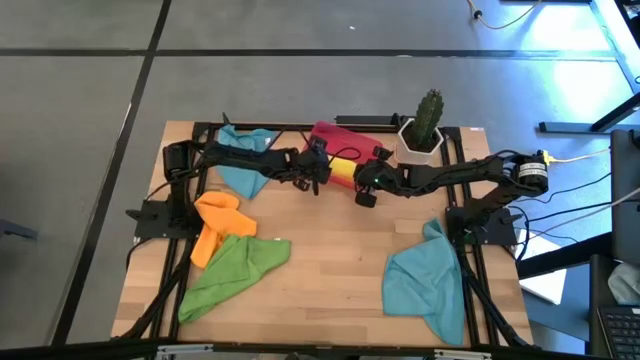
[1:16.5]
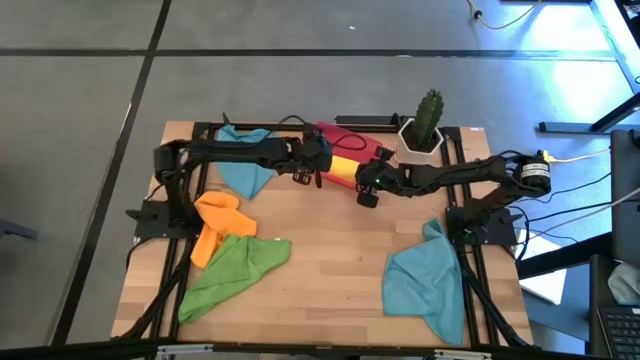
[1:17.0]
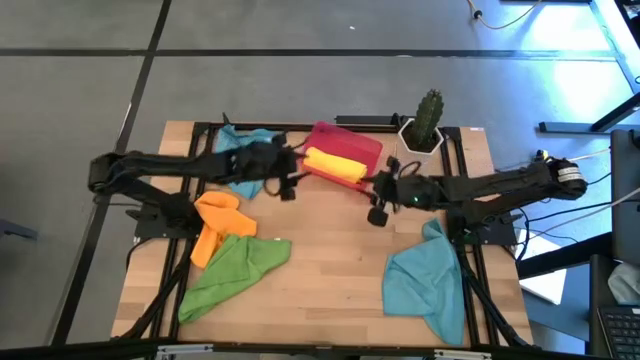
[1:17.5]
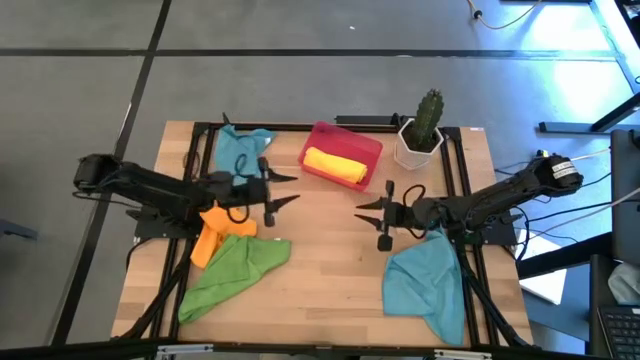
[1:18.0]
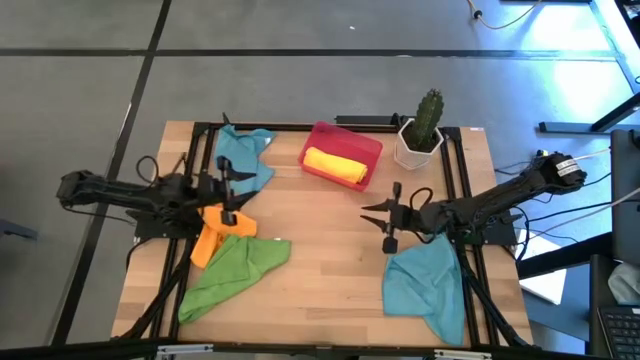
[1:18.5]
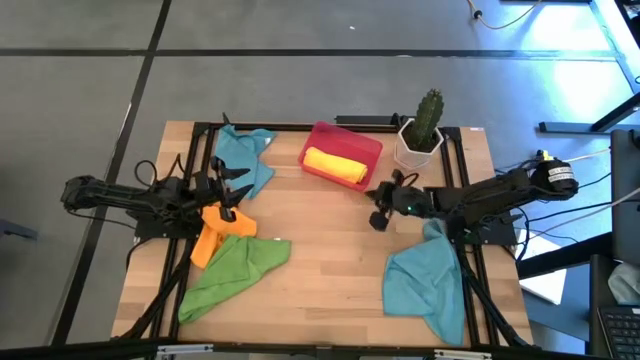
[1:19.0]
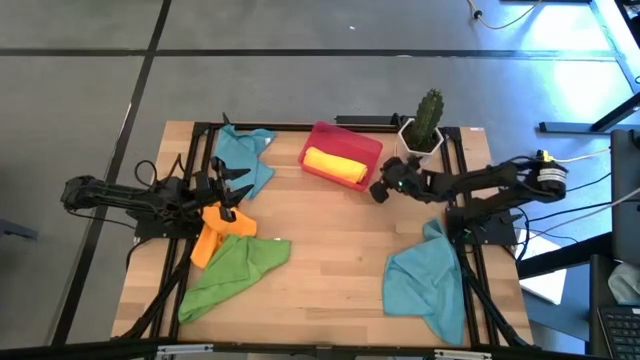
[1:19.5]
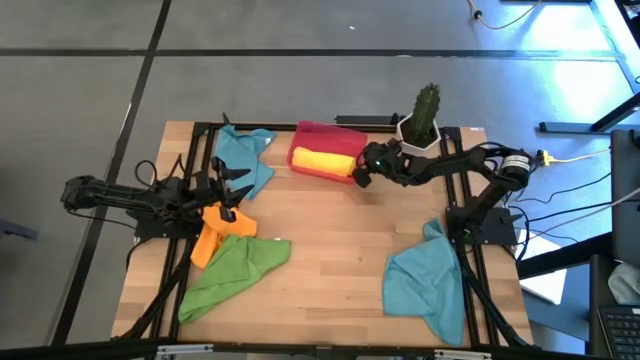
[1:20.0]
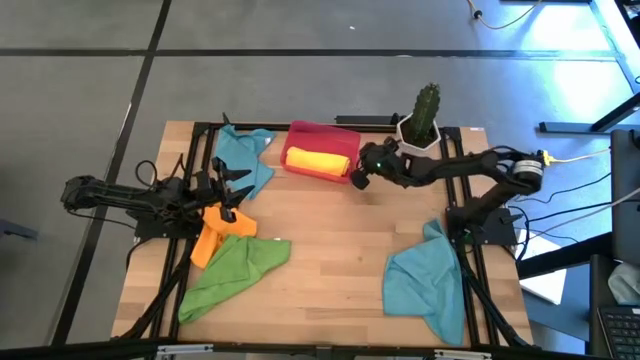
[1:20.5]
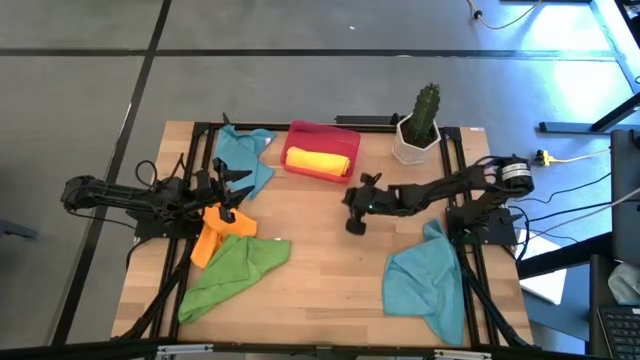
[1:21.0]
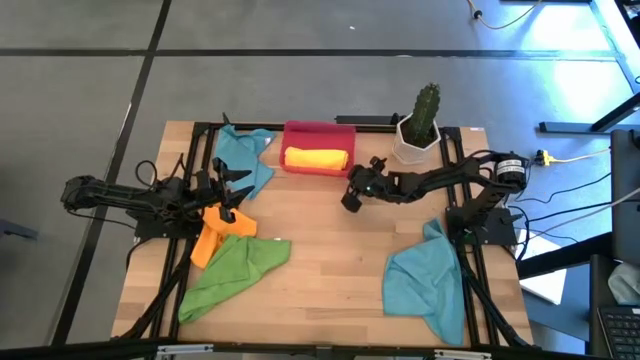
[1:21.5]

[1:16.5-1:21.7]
Task: Roll microfiber towels into tight, uniform cylinder then place into a basket
Adjust the red bin

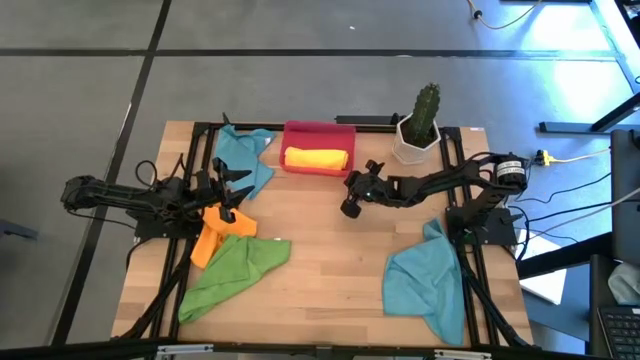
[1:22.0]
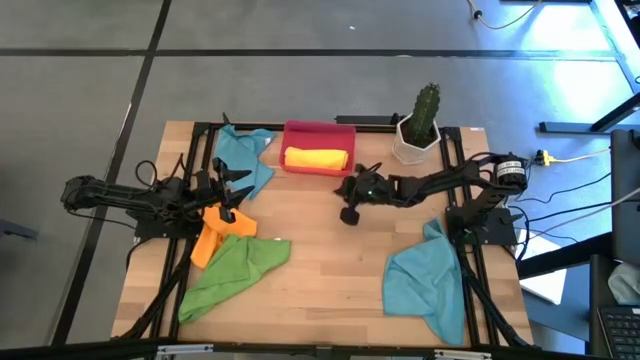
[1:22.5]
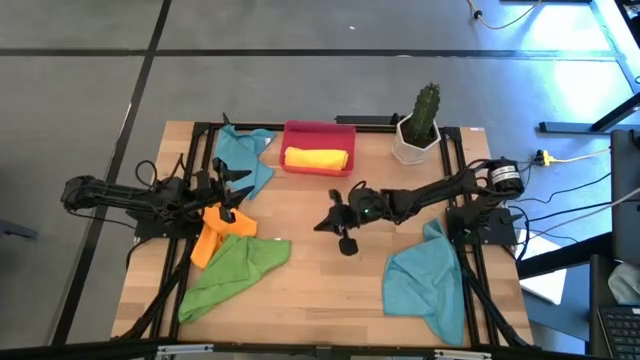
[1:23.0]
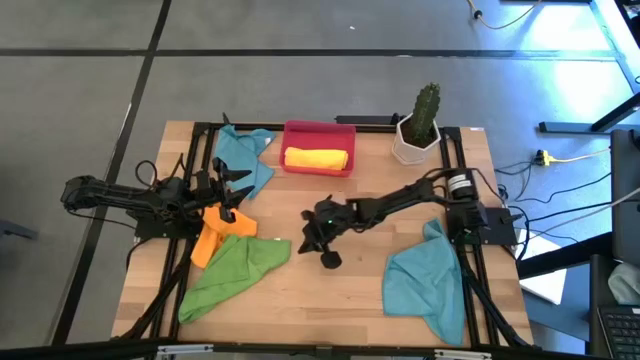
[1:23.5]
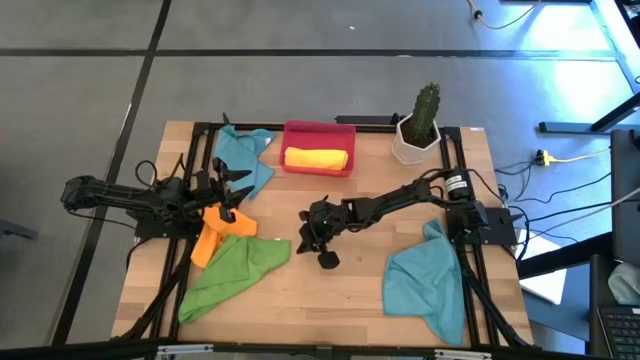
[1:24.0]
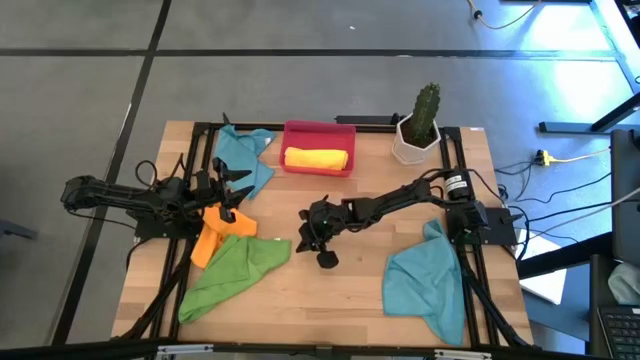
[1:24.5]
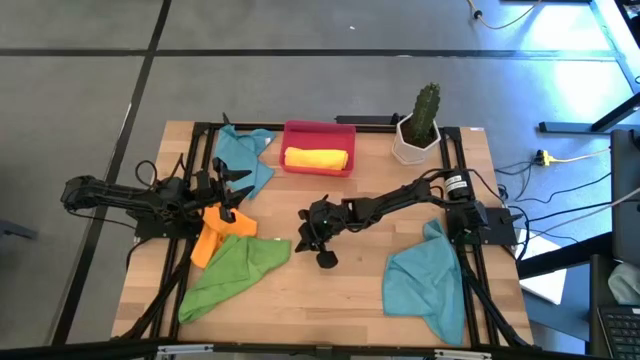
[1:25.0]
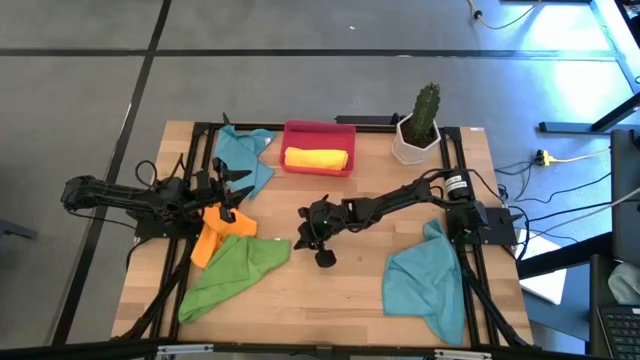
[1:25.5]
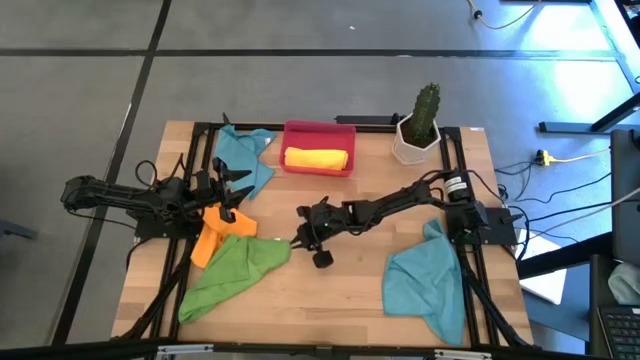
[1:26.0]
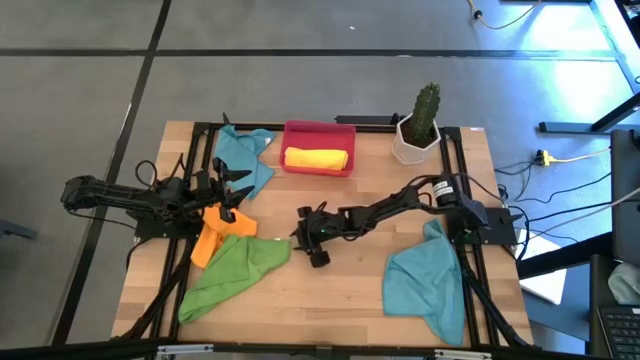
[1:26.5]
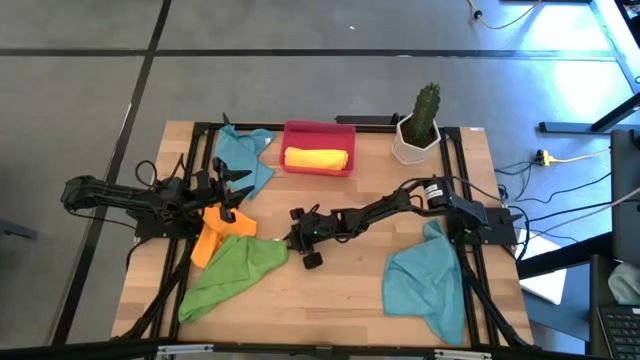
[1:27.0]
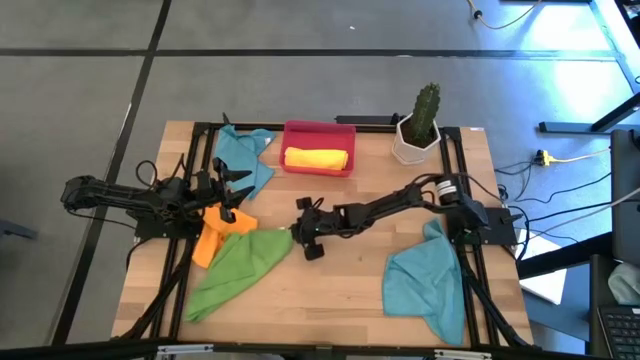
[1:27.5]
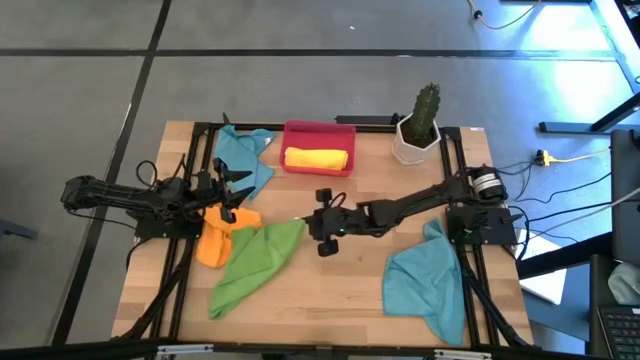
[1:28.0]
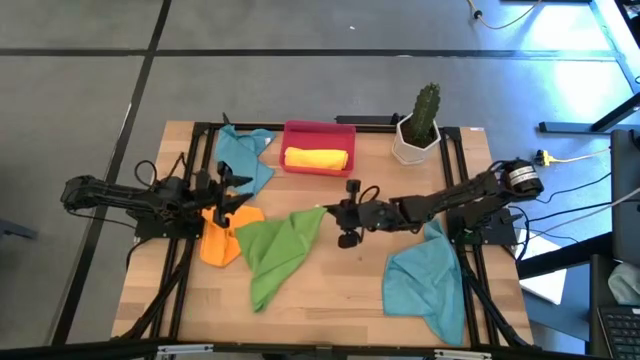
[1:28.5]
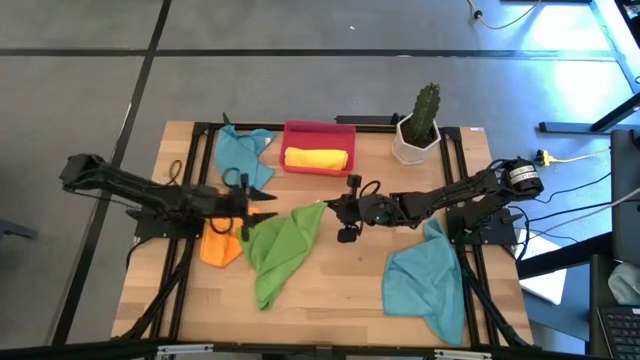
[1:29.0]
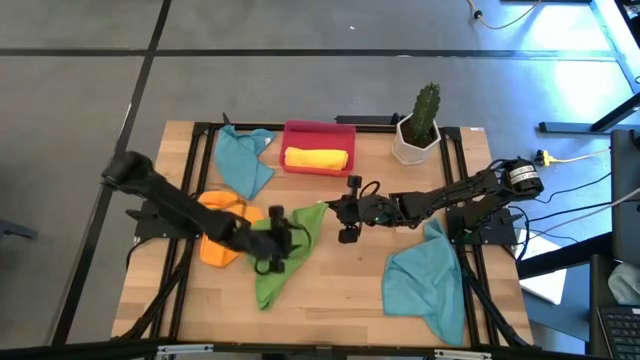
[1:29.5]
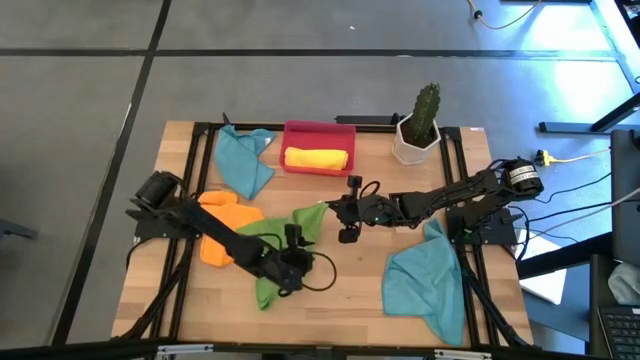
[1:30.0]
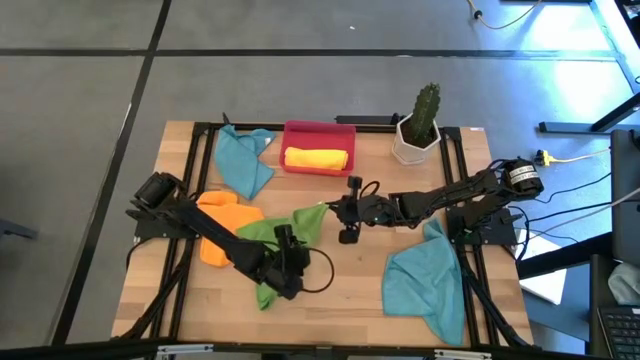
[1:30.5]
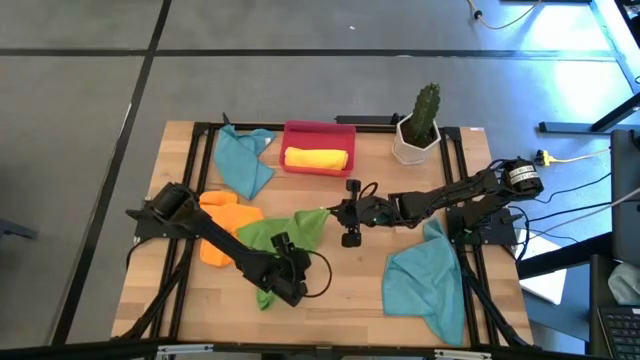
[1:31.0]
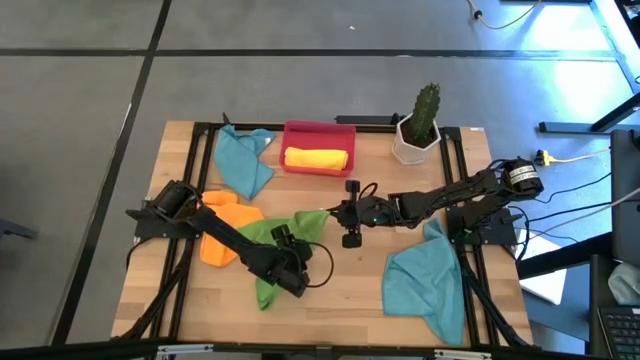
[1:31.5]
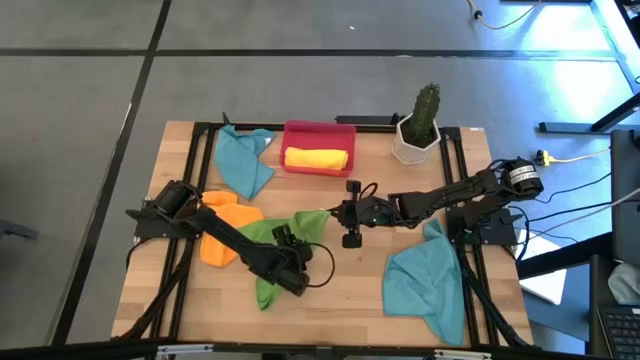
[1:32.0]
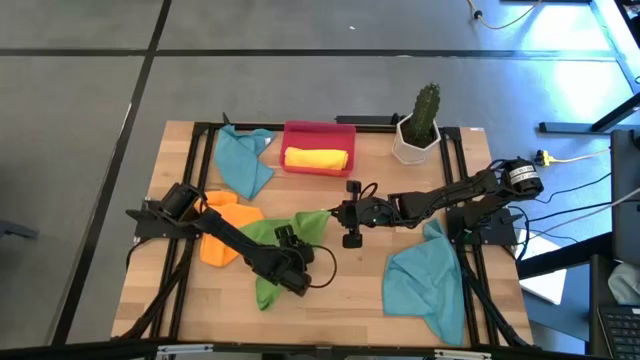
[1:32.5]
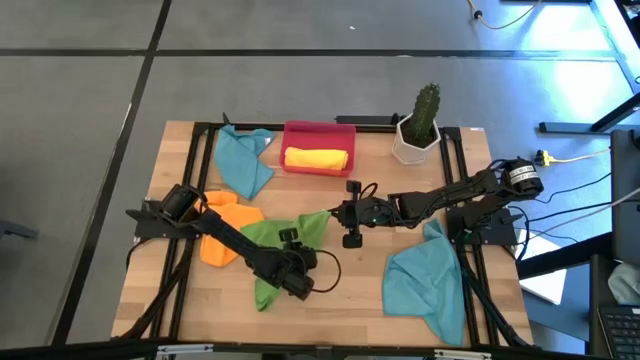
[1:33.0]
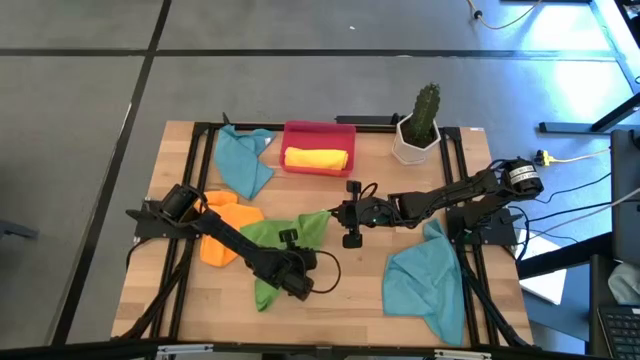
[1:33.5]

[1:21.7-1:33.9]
Roll the green towel

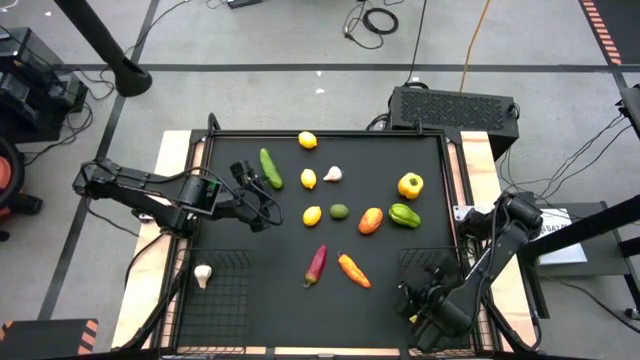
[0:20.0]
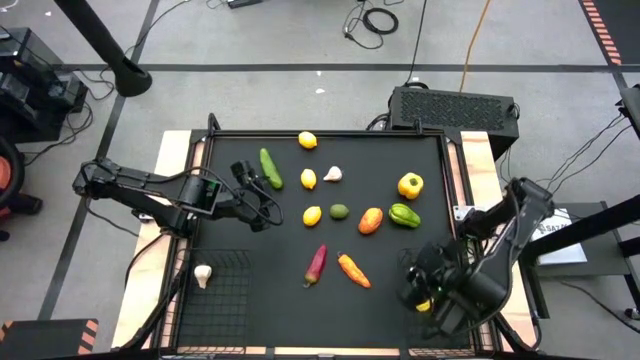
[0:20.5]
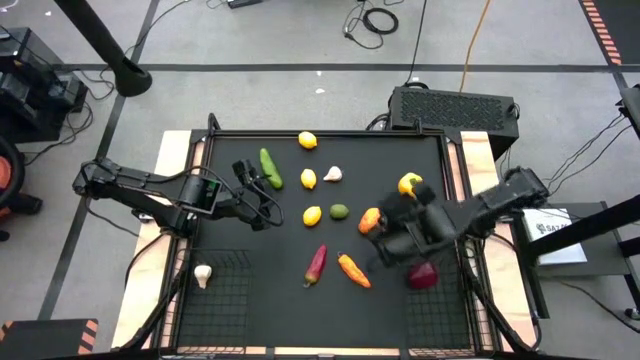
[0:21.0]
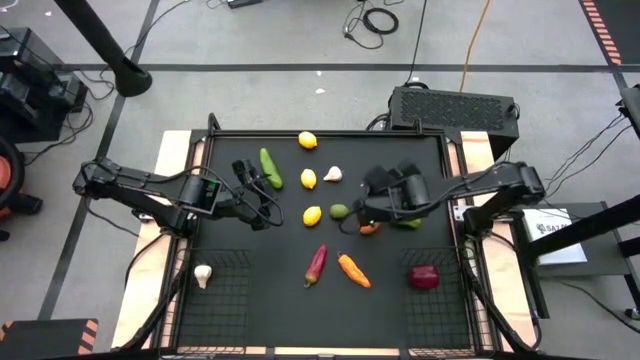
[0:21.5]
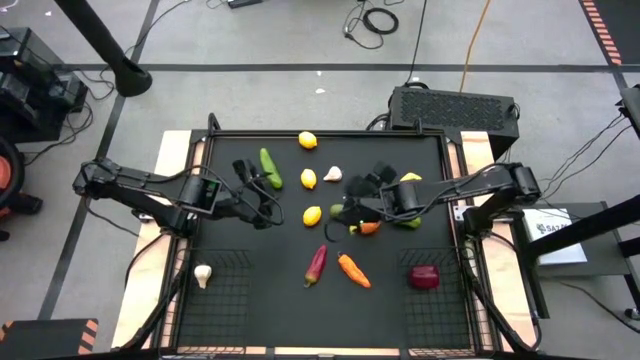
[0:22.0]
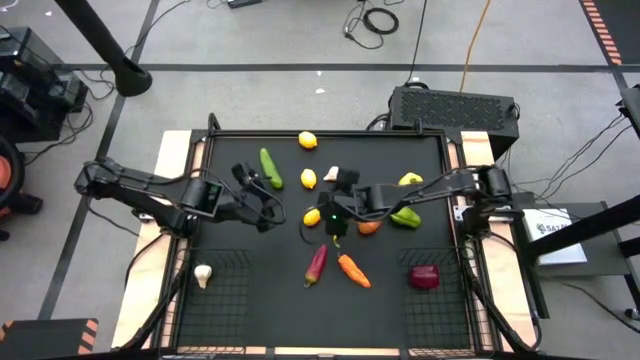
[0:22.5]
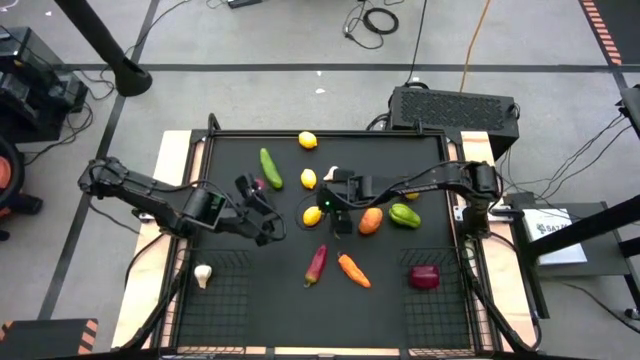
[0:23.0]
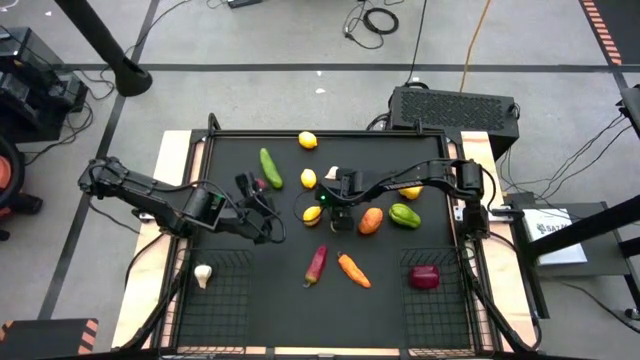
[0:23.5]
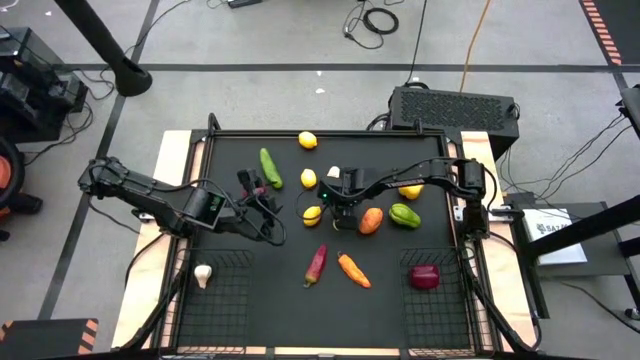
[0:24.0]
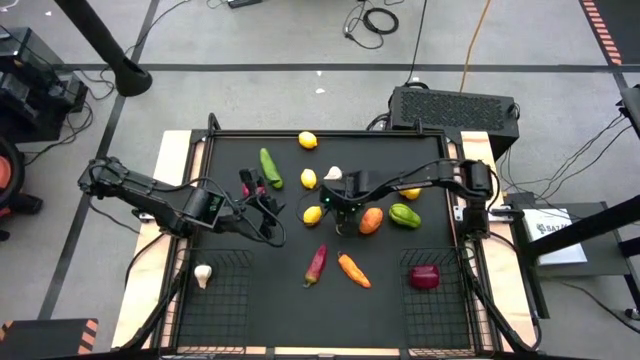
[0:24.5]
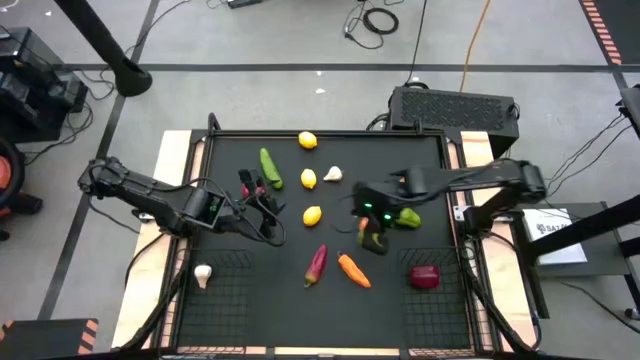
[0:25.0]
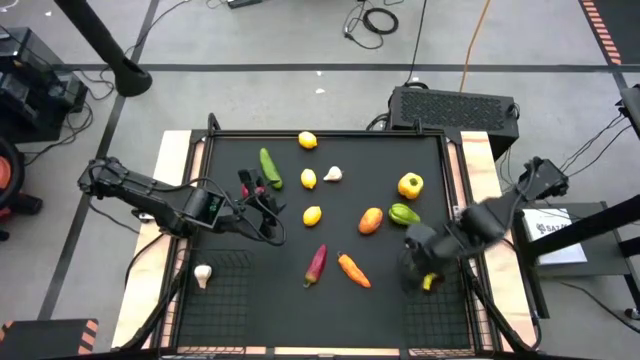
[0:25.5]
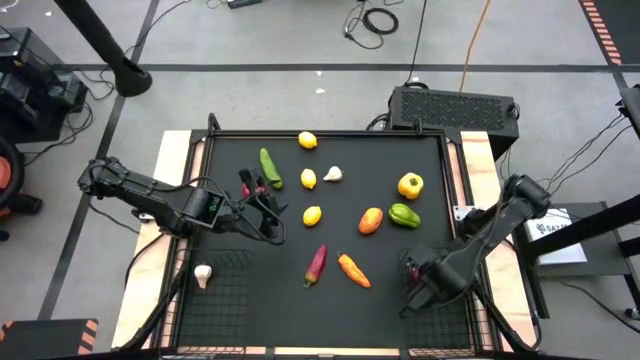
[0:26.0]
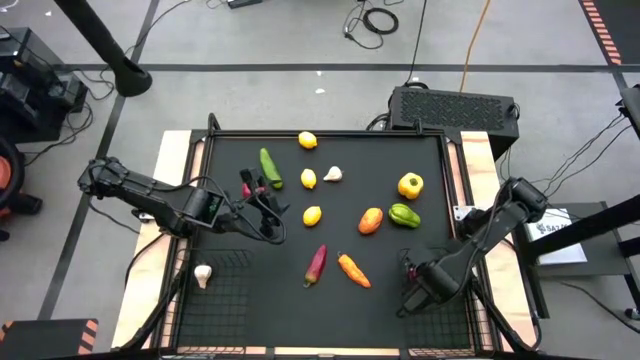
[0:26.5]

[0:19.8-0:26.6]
Task: Sort produce into baskets
Put the lime into the bottom right basket
